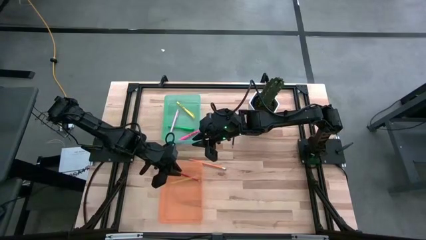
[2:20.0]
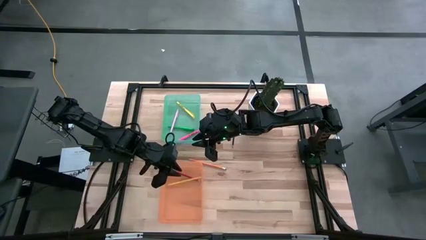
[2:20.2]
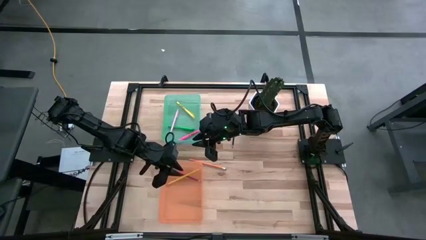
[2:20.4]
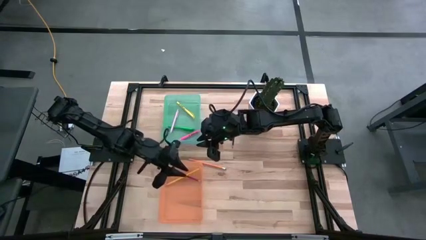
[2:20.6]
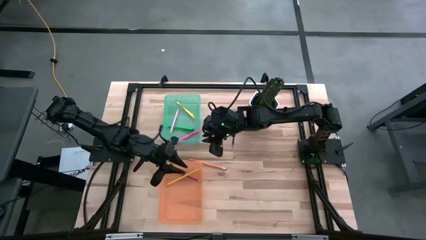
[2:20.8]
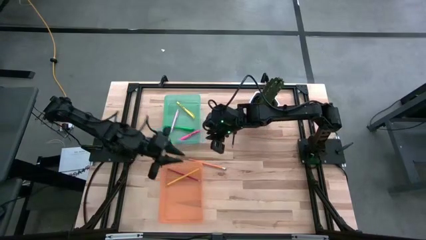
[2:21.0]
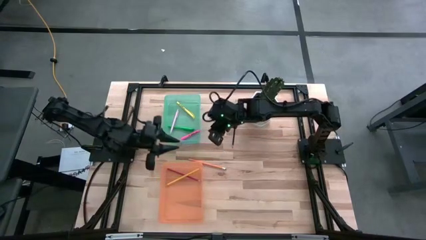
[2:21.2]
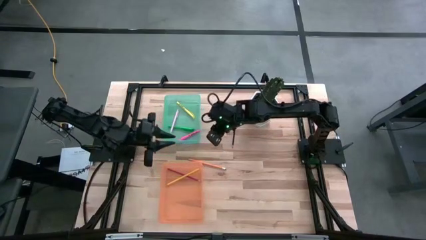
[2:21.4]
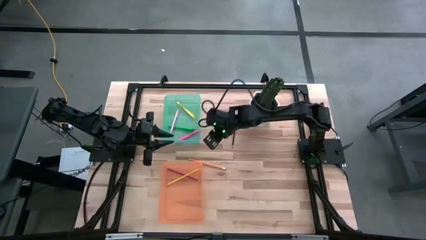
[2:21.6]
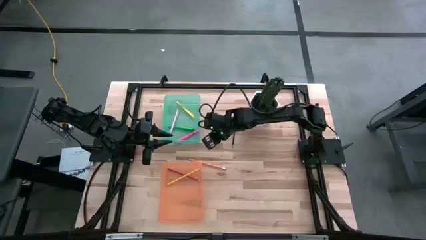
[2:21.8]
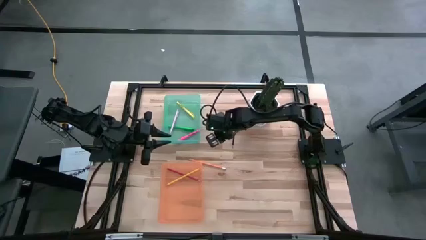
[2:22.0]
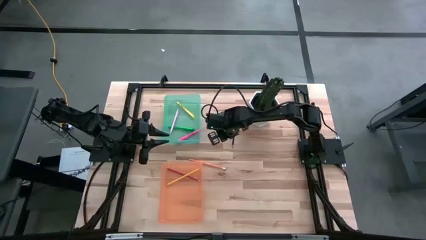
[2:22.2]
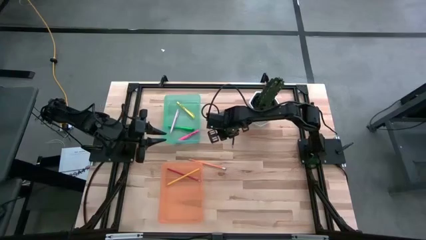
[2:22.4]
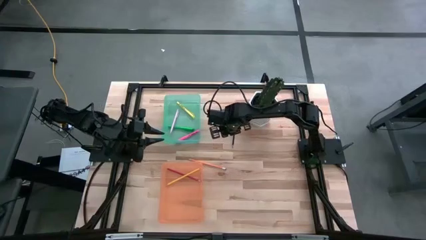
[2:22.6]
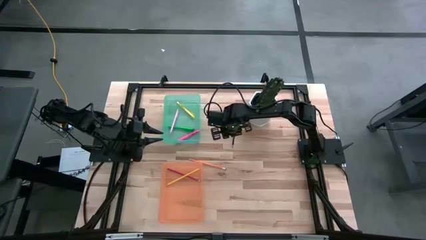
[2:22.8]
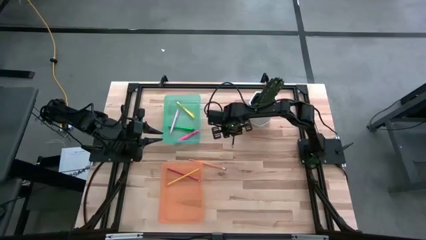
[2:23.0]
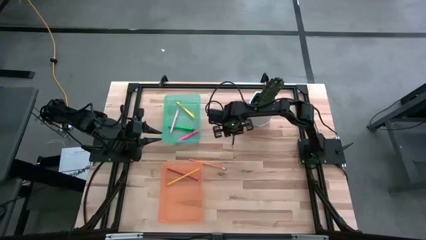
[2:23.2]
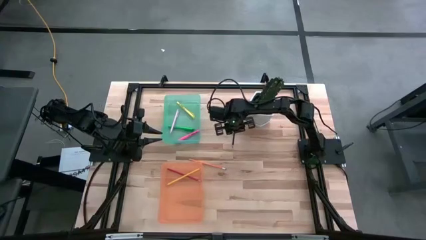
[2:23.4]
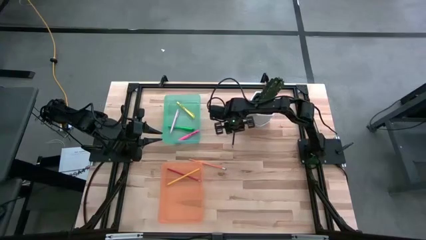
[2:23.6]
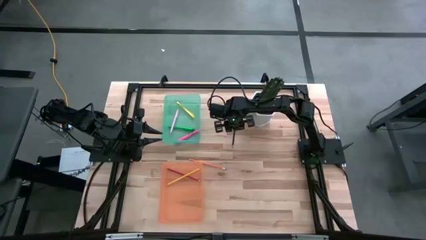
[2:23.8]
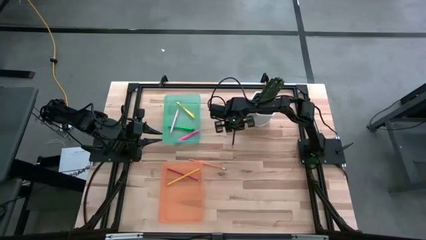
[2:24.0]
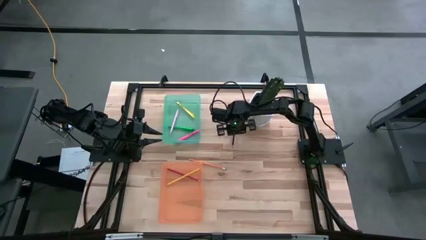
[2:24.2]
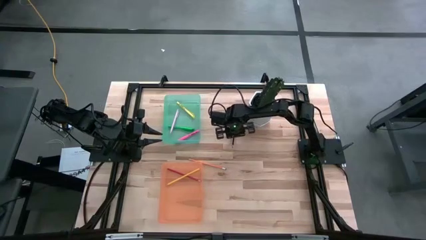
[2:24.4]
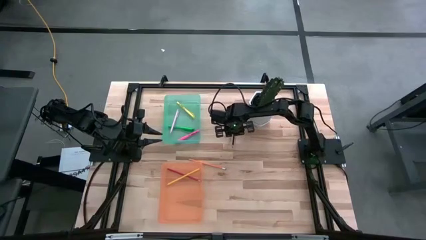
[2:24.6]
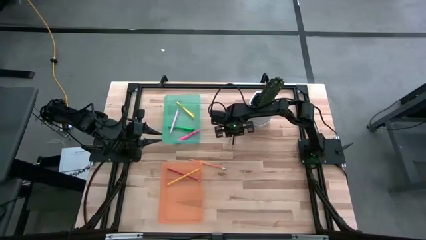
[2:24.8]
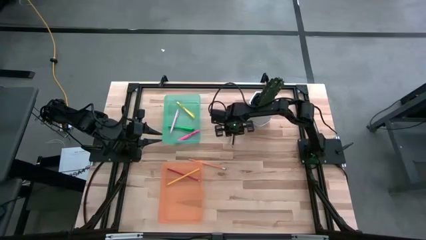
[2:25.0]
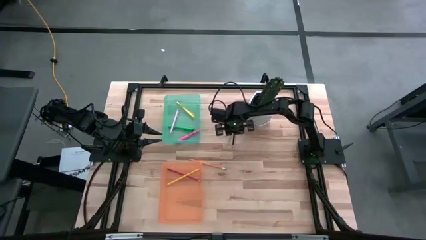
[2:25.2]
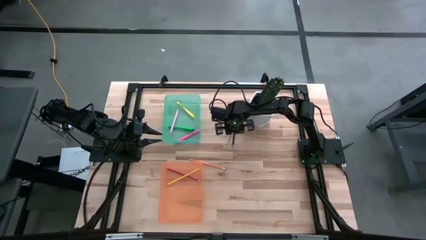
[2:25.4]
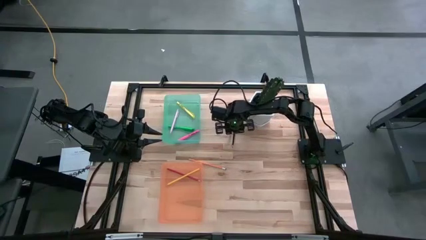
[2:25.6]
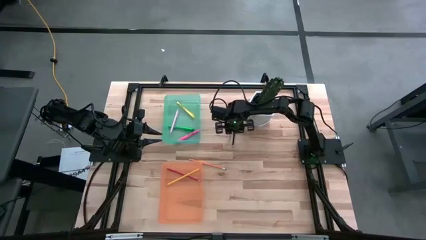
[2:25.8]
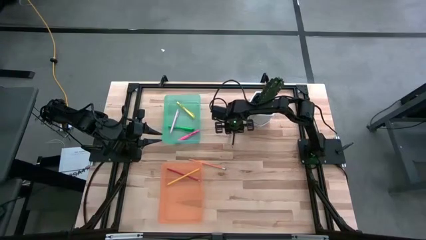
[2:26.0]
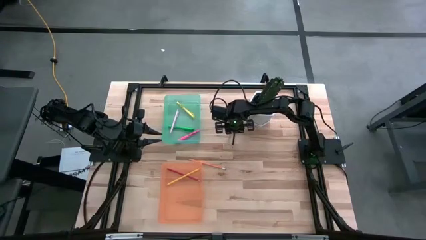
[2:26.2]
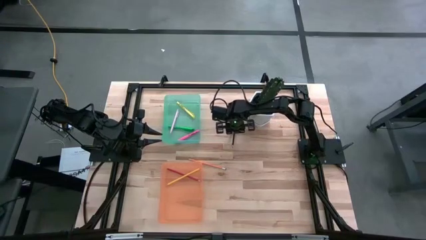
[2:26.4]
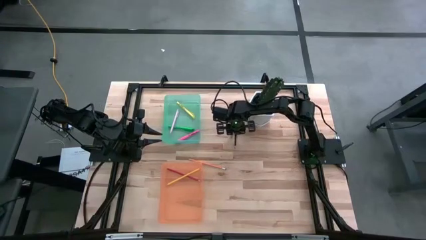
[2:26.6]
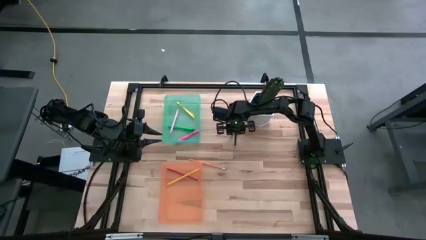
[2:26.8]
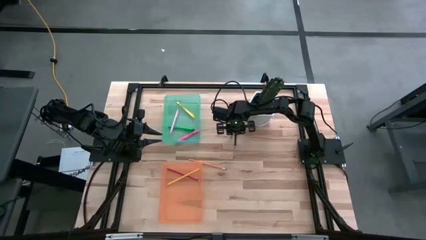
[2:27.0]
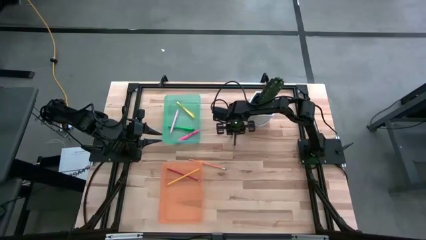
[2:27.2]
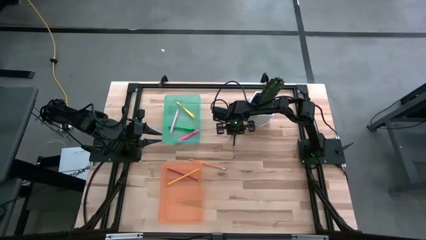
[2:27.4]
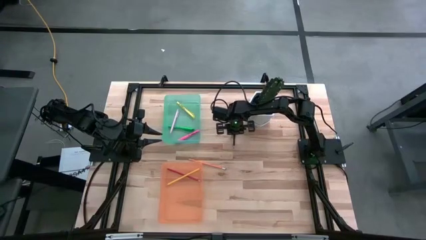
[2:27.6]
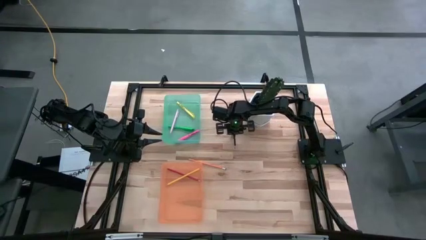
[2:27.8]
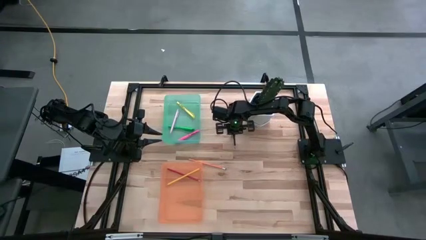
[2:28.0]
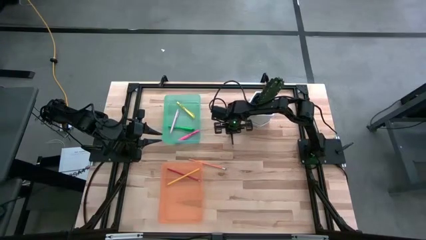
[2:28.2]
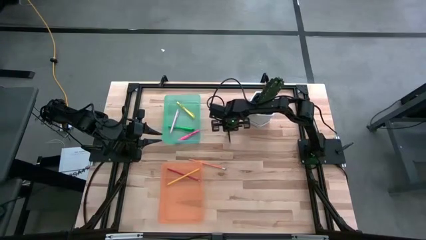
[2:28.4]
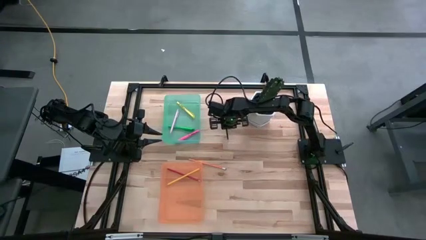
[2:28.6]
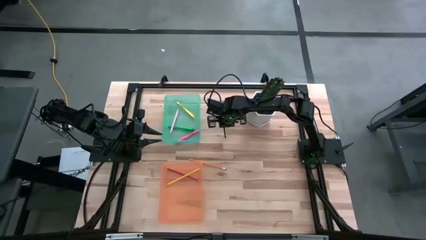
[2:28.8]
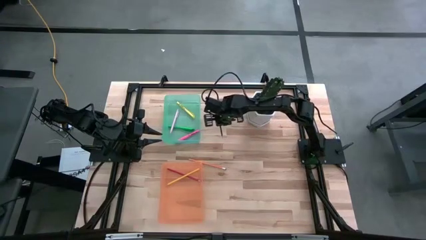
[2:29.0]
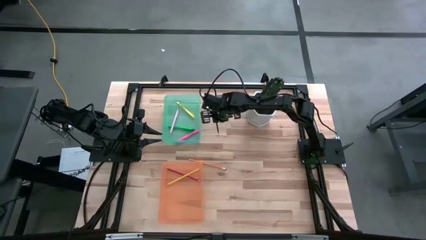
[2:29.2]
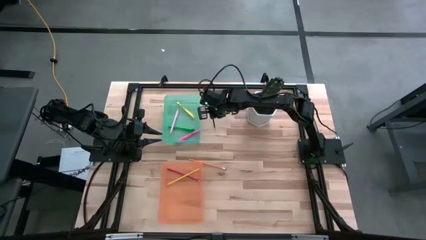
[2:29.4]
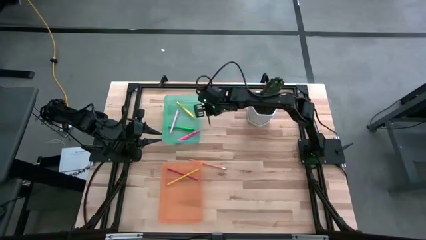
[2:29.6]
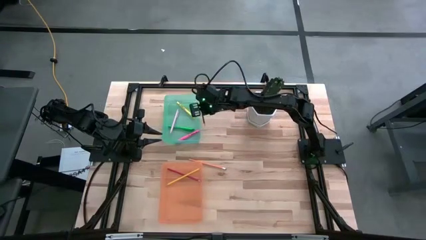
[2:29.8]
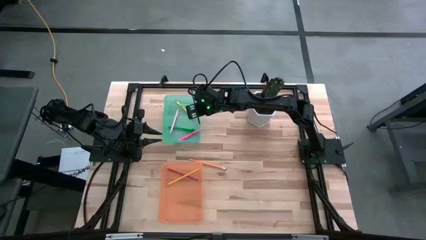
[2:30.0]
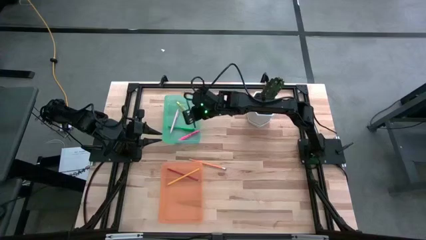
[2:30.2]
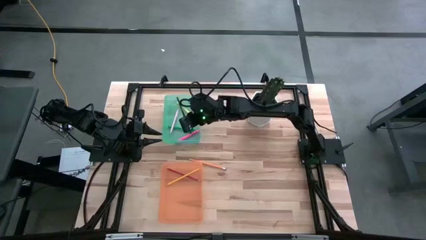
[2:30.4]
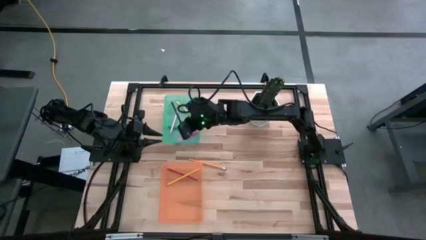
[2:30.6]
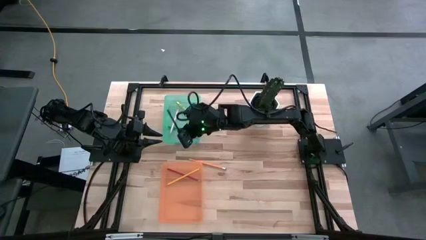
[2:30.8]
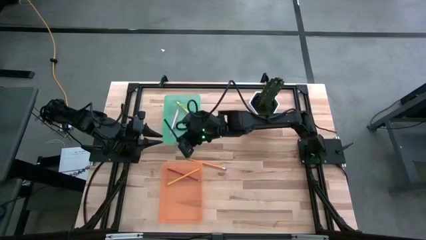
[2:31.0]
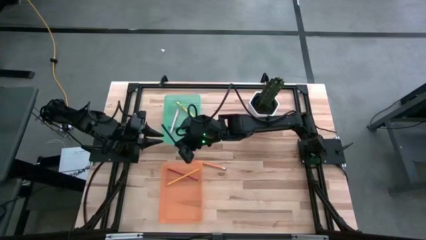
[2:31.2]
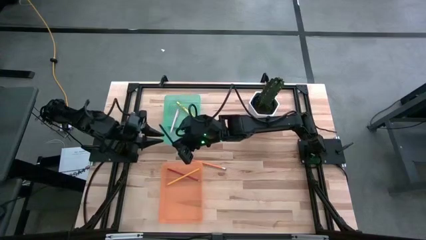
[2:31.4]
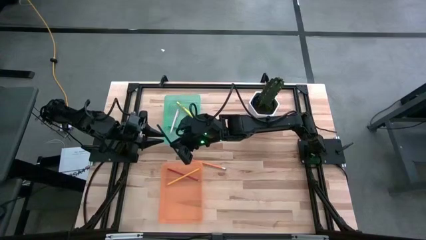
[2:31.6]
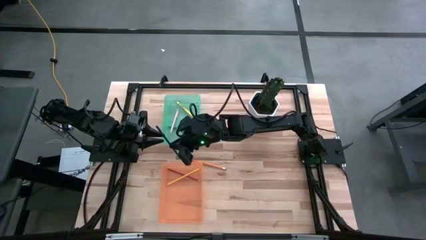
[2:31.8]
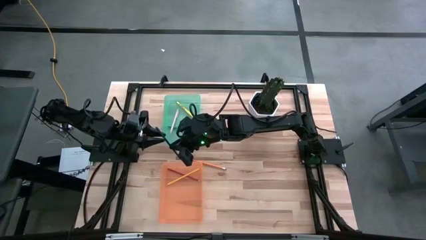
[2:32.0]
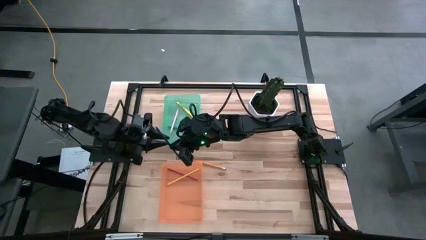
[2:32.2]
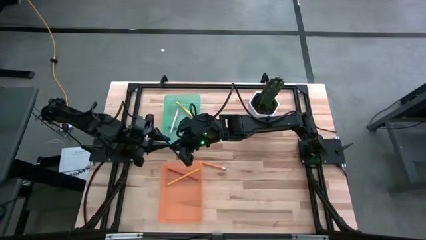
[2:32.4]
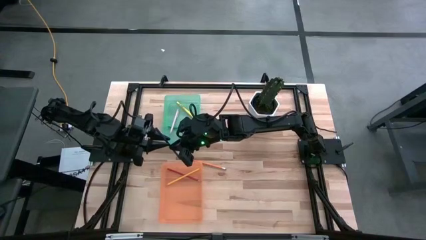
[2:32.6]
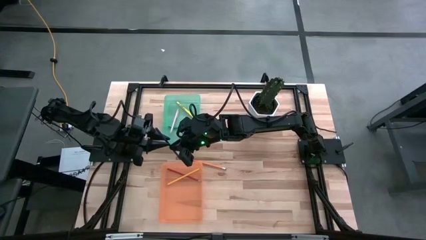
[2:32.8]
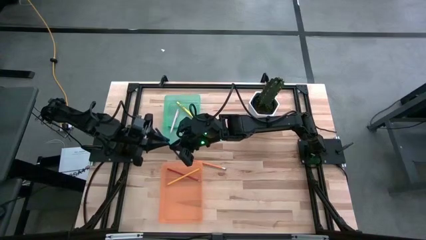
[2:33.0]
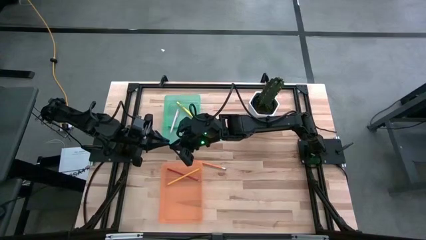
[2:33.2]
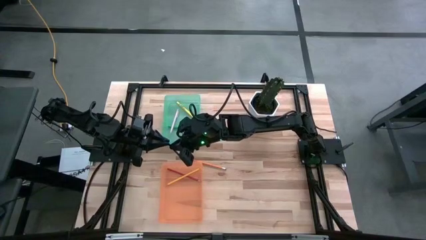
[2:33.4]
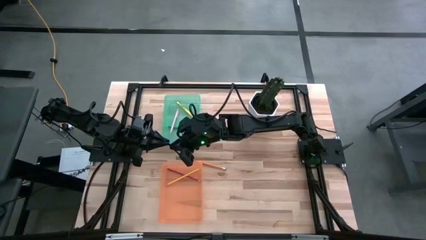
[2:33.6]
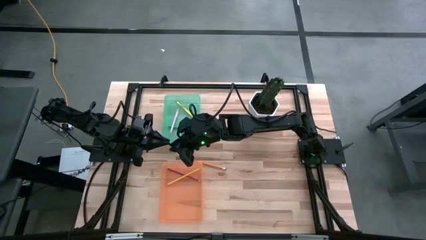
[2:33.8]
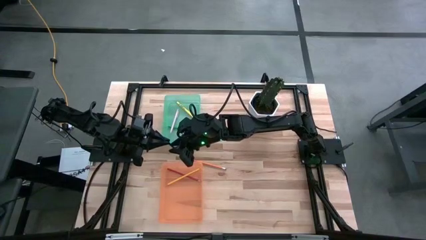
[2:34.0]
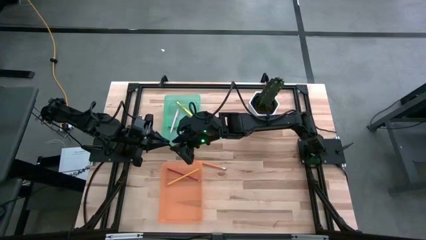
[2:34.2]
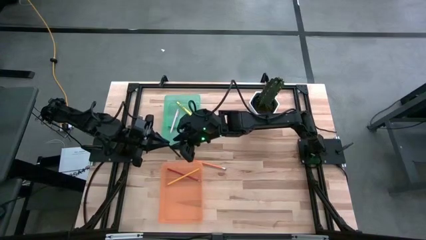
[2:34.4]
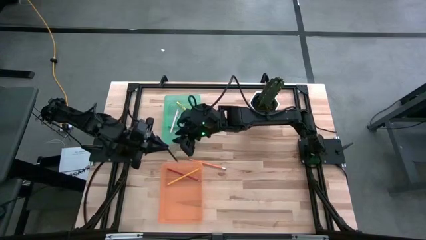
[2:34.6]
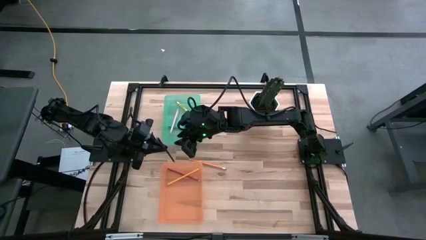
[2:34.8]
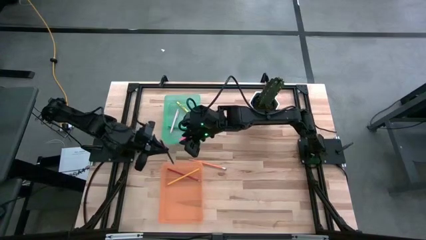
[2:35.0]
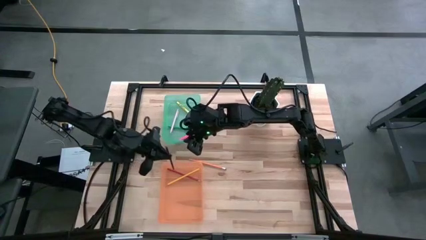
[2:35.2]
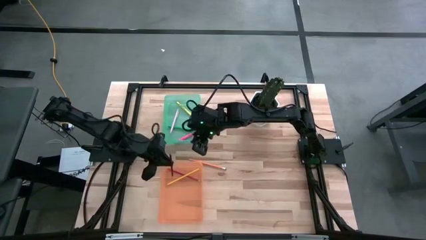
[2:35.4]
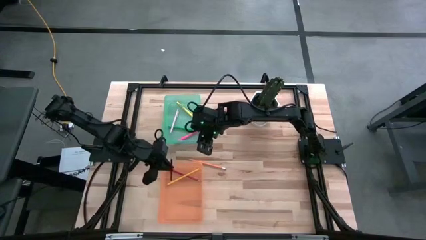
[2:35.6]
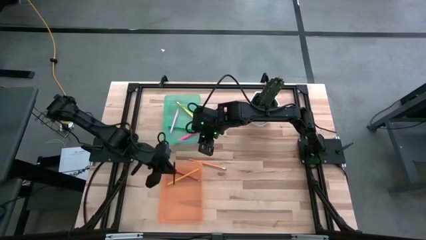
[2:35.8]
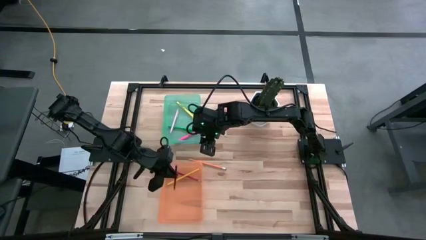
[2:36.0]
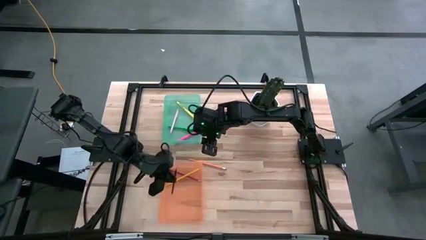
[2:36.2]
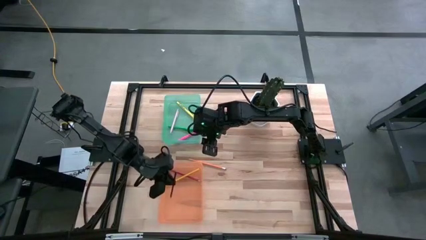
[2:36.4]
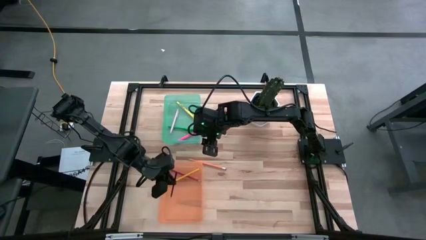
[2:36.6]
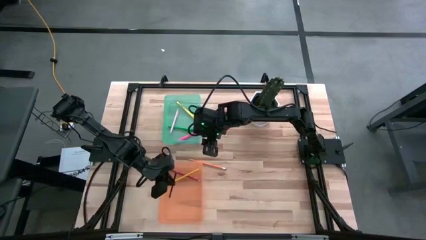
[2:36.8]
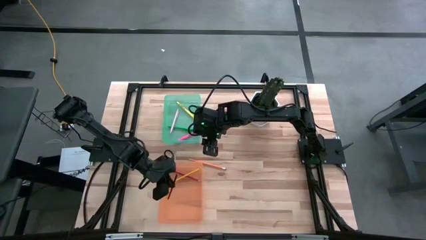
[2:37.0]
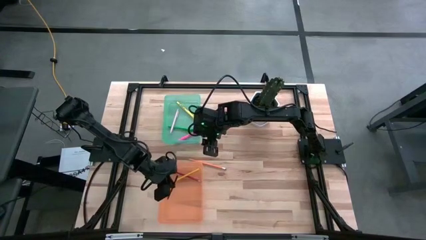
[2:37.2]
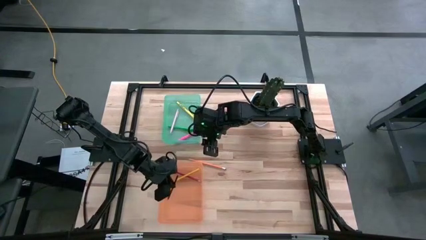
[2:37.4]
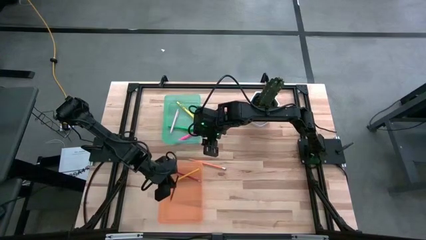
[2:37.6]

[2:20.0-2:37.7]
Task: Sort pens & pencils
Put the blue pencil into the orange bin
